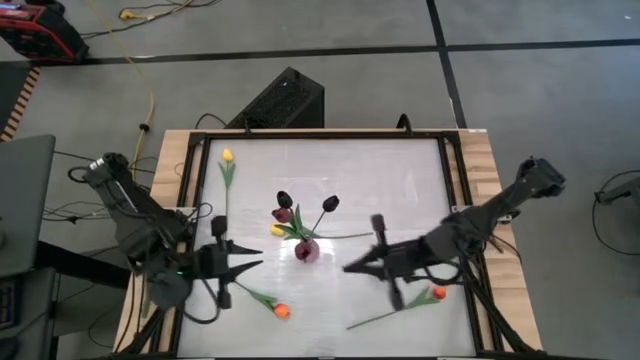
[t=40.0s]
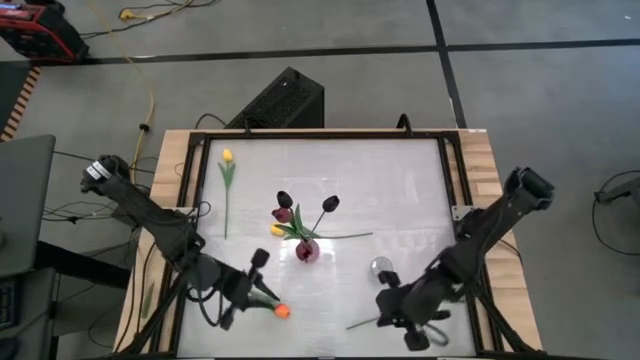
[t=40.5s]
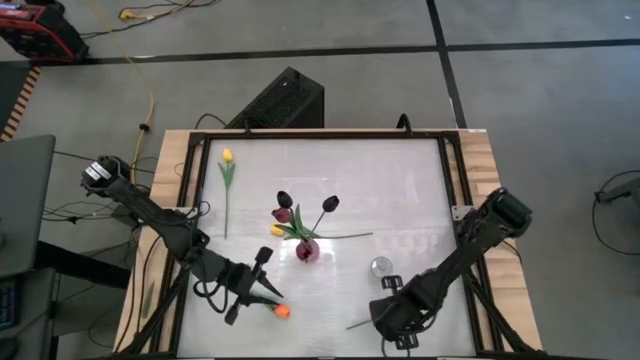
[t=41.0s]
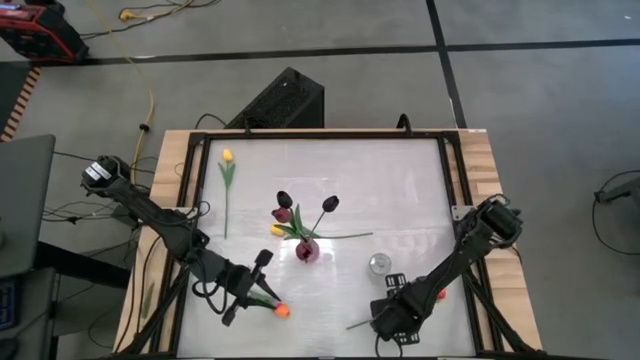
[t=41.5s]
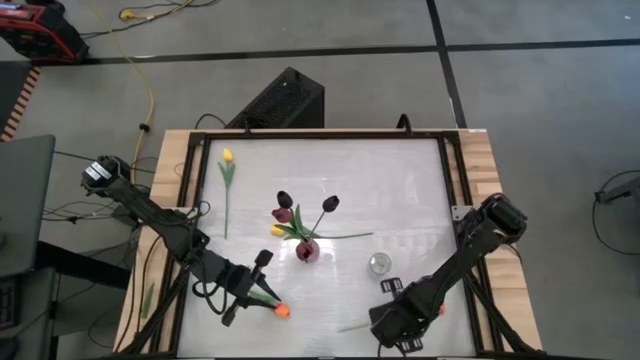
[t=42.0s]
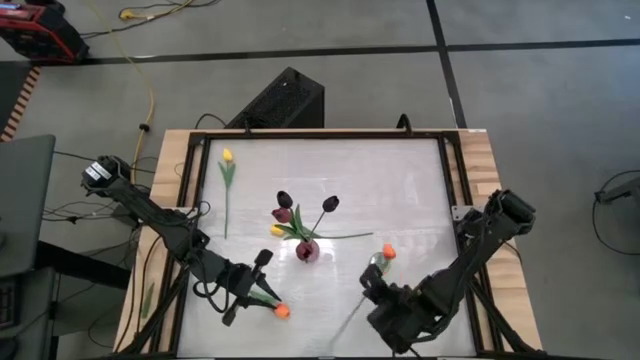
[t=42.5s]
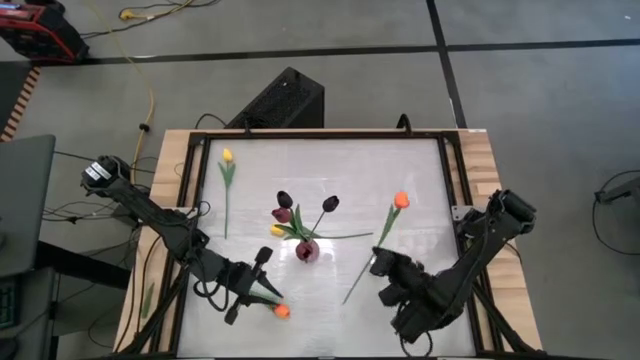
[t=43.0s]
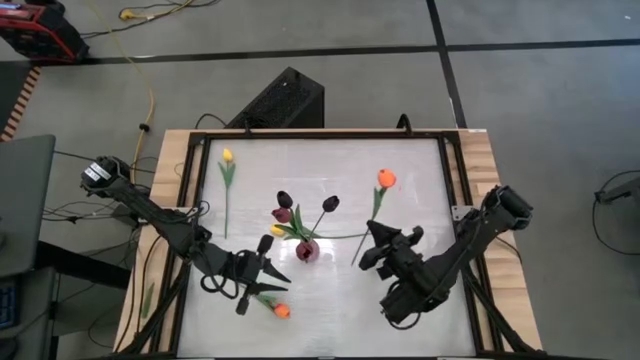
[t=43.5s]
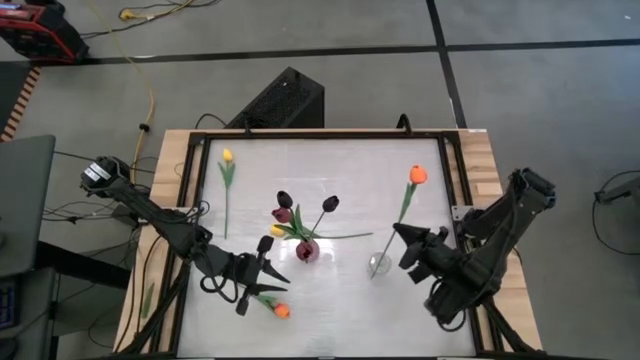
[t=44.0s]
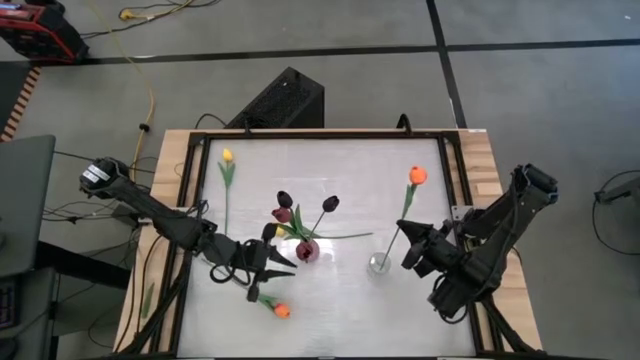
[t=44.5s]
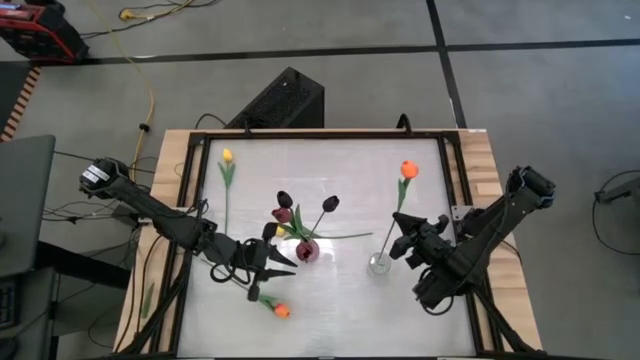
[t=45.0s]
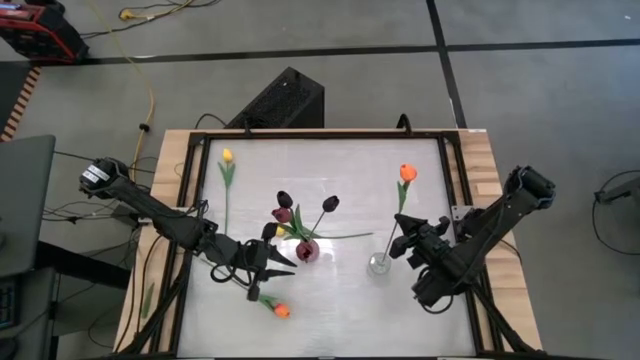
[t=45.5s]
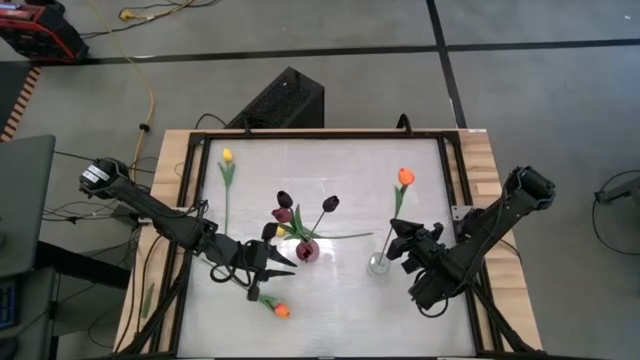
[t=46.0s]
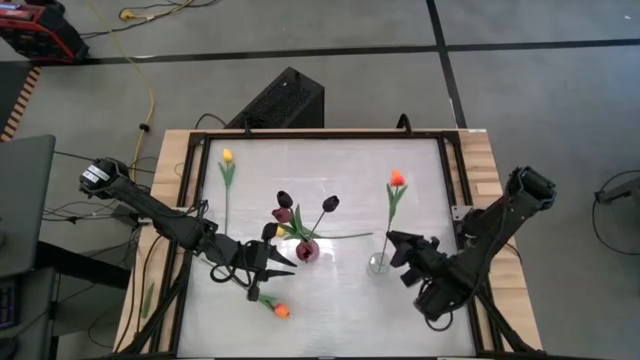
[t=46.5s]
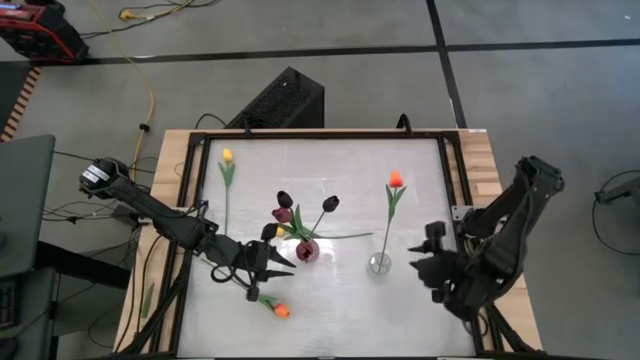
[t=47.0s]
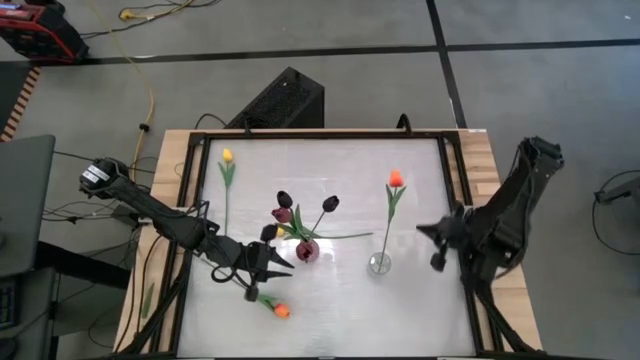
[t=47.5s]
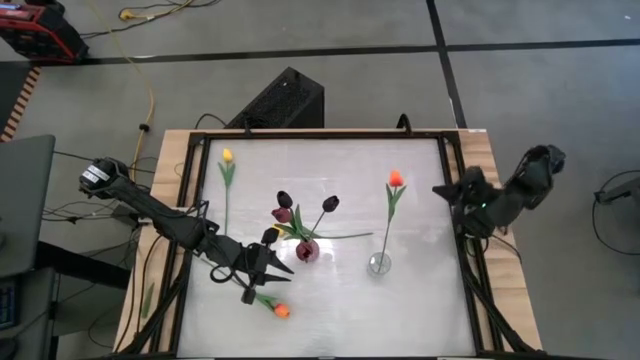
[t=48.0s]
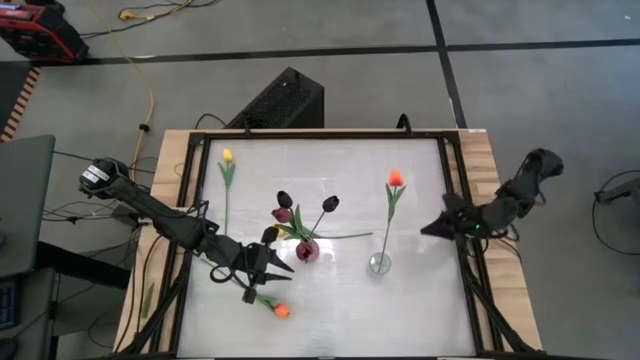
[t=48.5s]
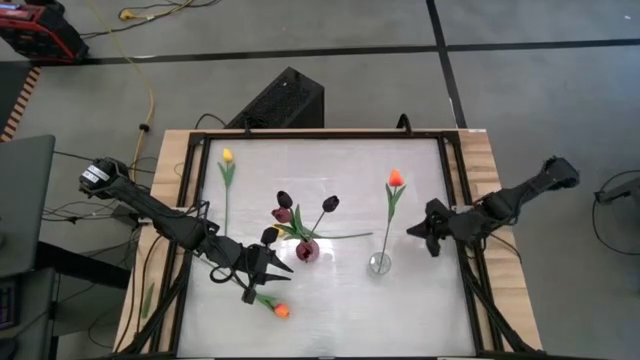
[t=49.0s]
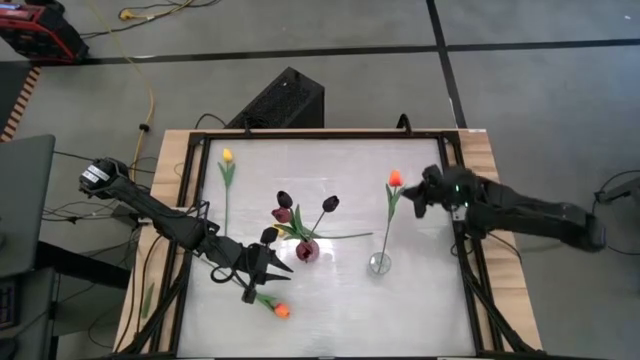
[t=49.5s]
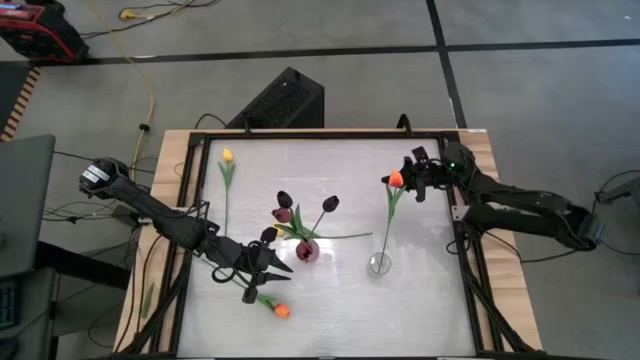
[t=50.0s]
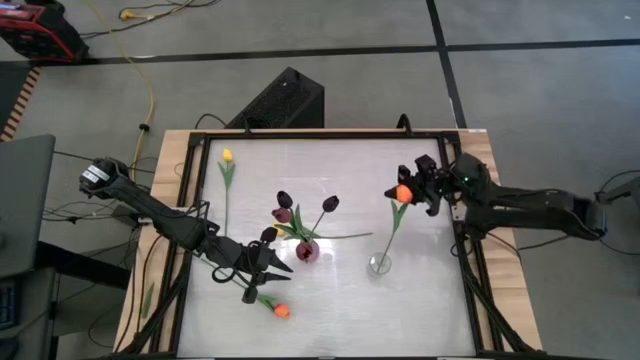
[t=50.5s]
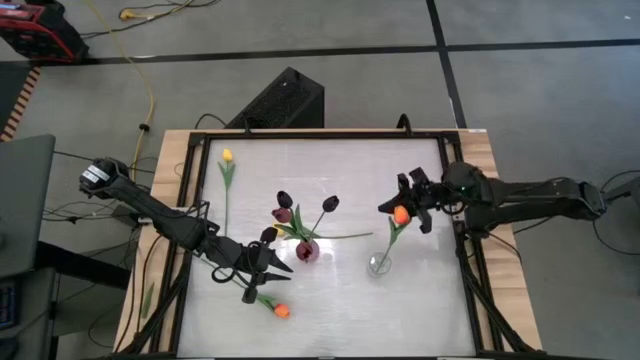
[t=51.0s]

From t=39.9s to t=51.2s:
Task: Sort flowers into vase by color
Put the right orange flower into the transparent vase

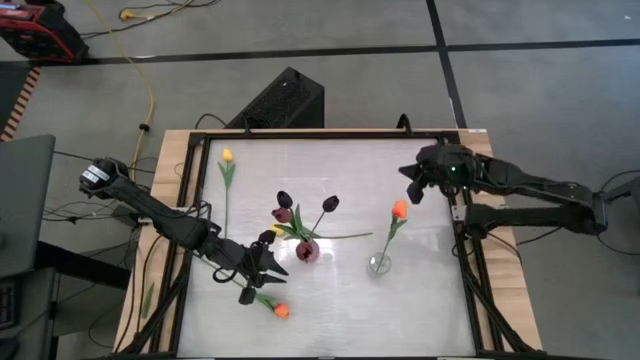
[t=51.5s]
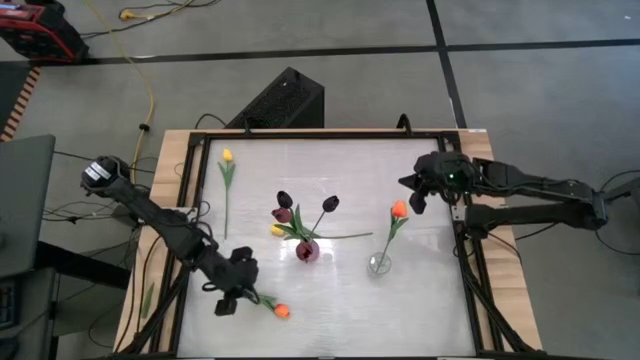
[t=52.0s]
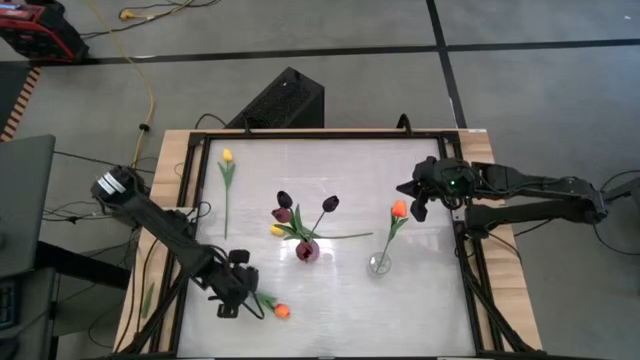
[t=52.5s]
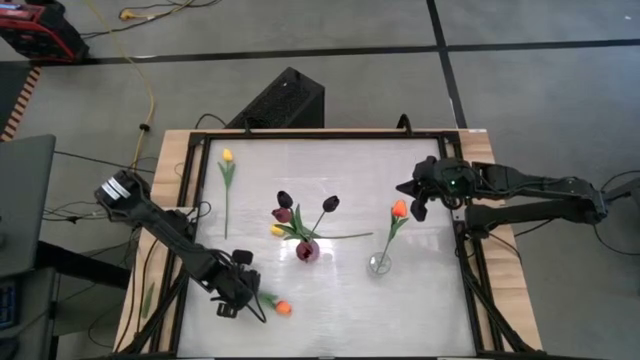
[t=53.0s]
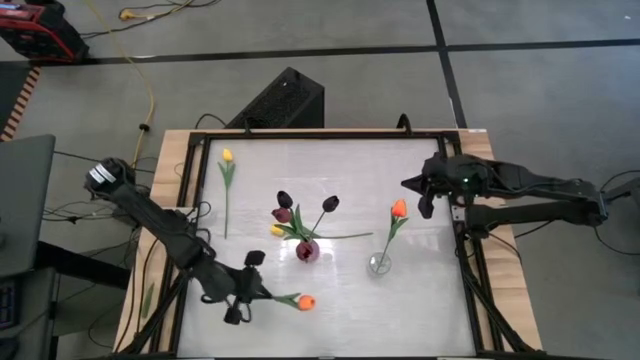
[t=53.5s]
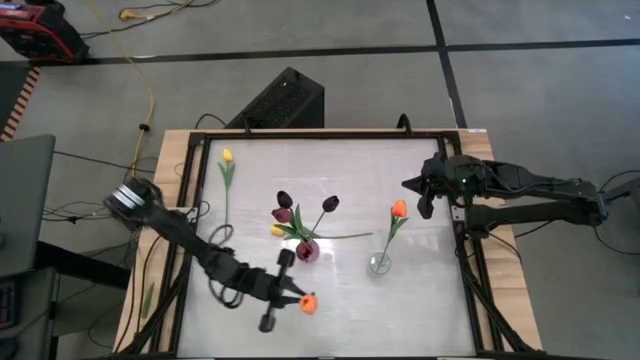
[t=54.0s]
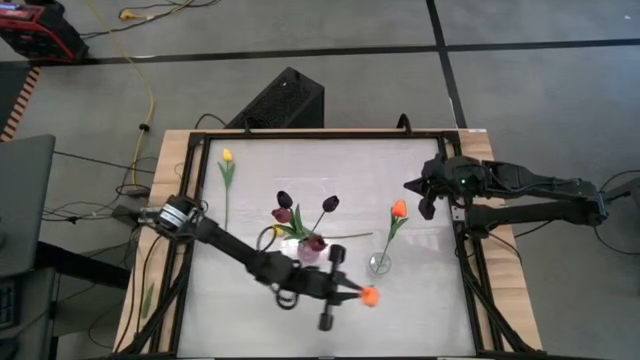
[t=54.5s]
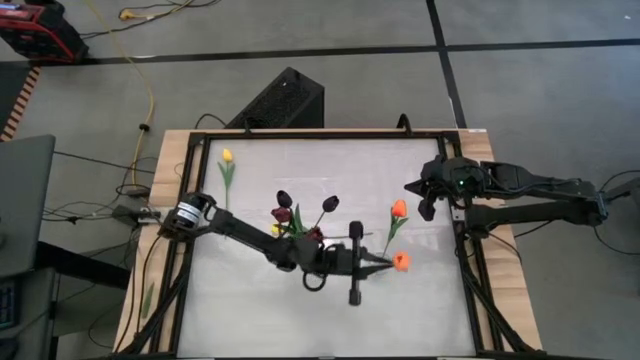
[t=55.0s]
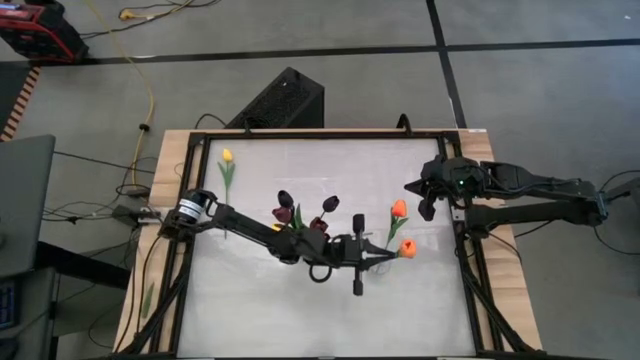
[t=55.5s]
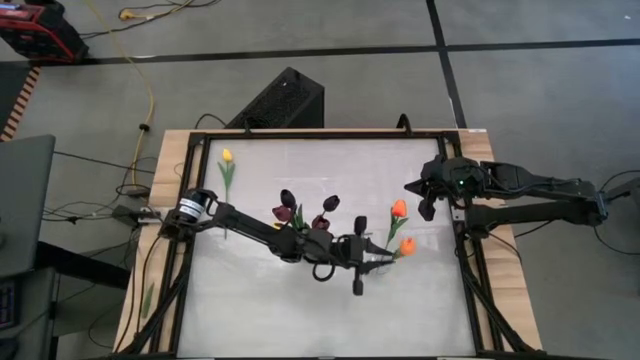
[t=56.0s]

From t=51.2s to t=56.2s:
Put the orange flower into the transparent vase

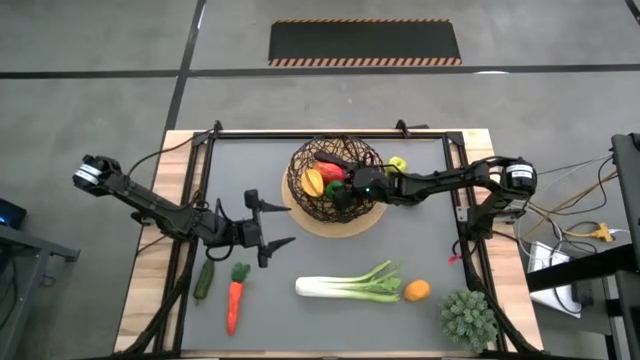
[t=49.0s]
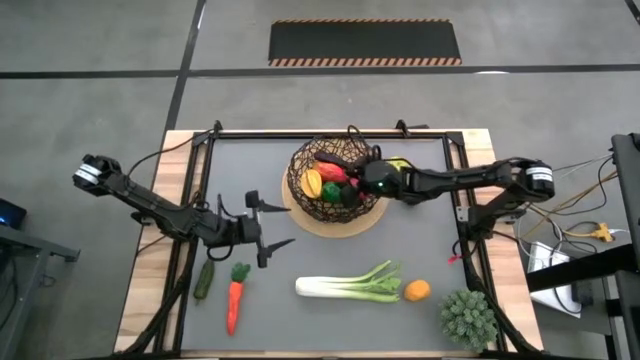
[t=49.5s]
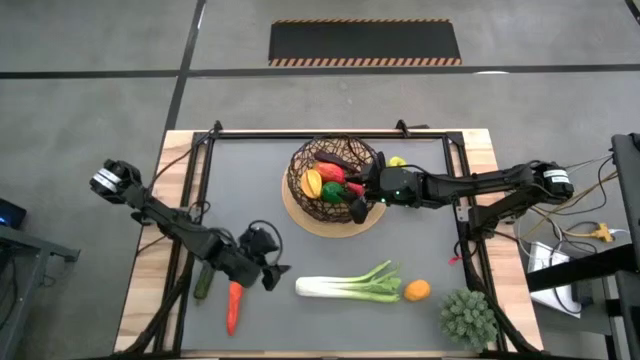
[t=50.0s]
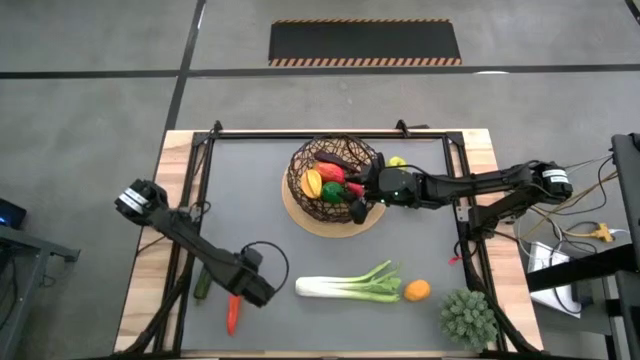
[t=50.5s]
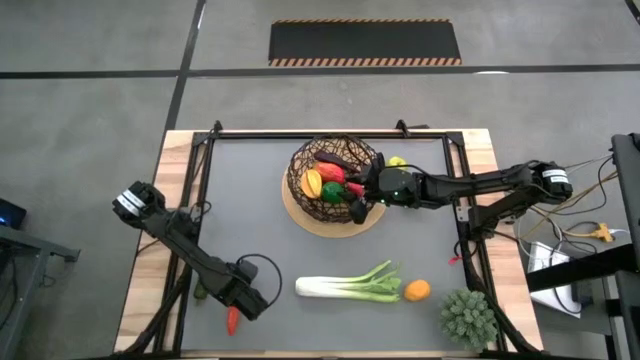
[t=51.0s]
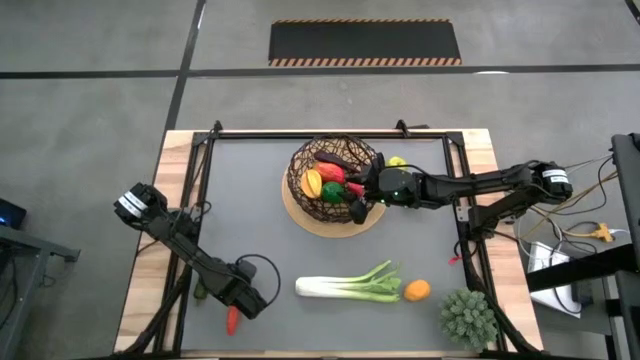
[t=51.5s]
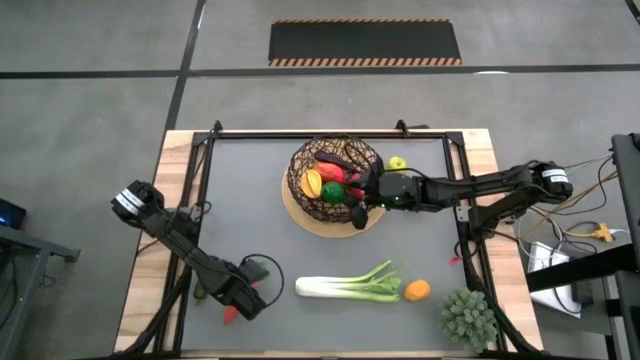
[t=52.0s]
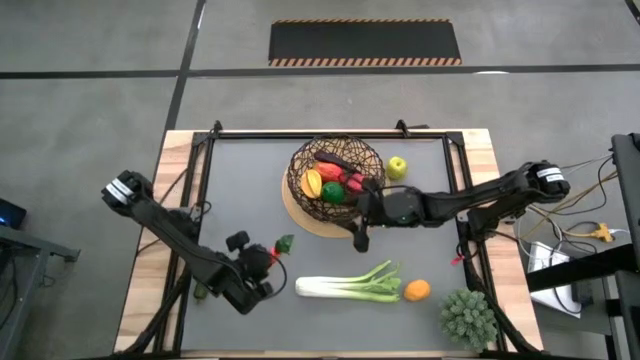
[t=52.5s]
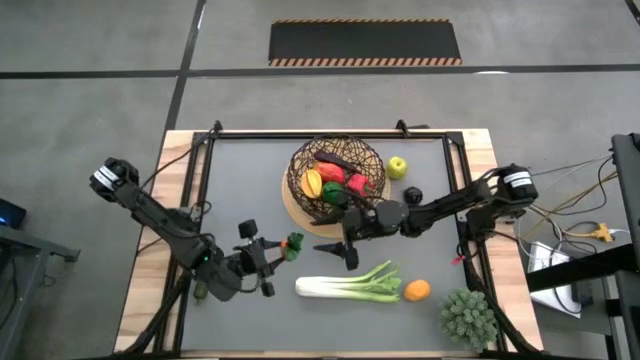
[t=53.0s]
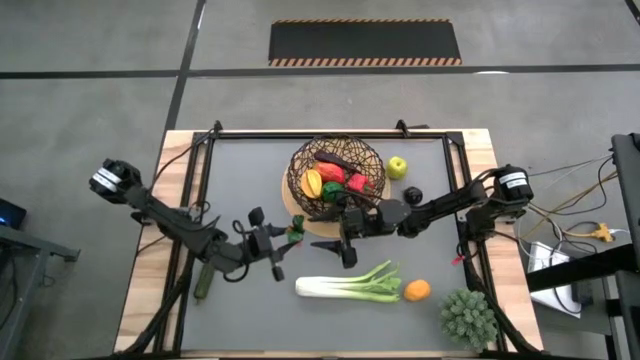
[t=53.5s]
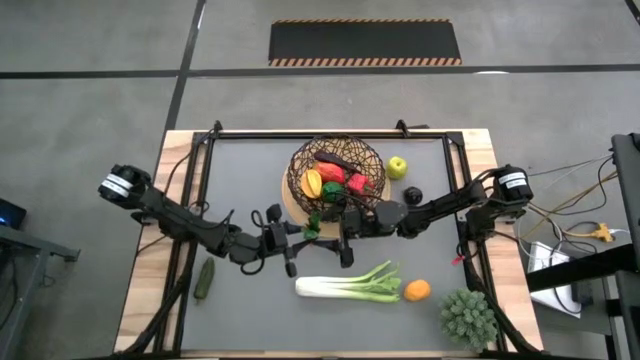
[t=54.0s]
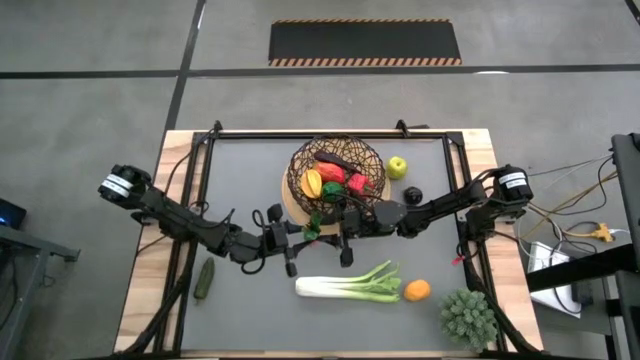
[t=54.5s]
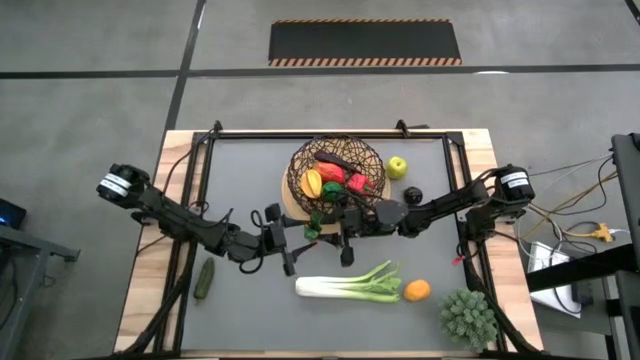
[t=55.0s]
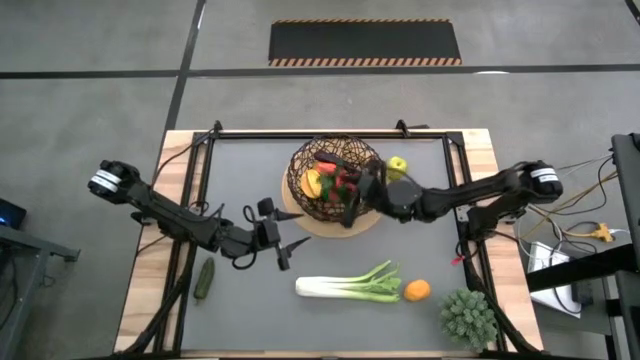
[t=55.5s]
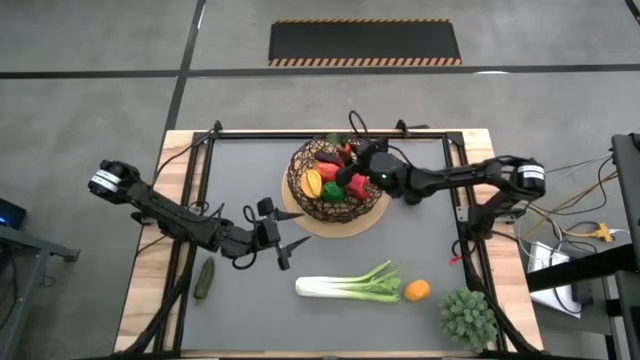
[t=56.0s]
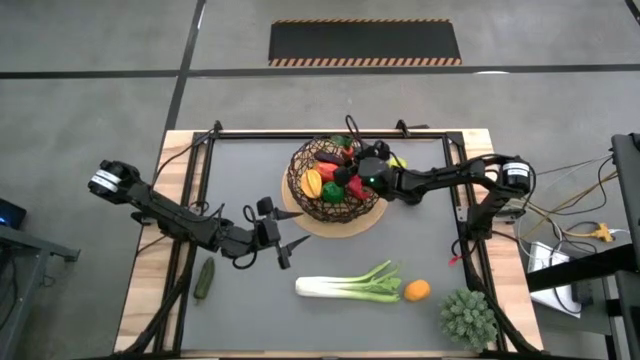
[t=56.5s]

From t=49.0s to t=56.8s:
Task: Build produce basket
Put the carrot into the basket
